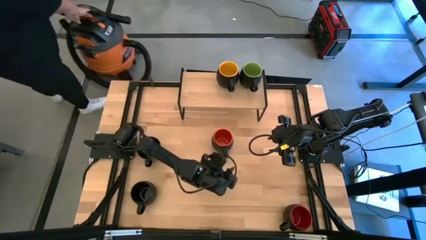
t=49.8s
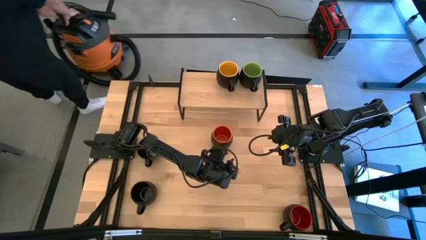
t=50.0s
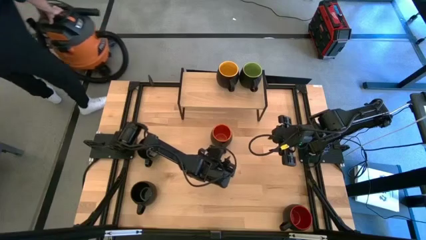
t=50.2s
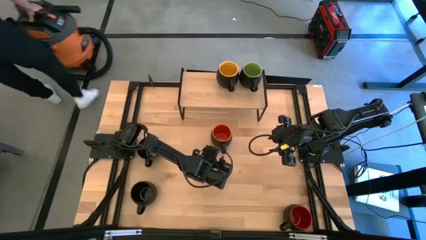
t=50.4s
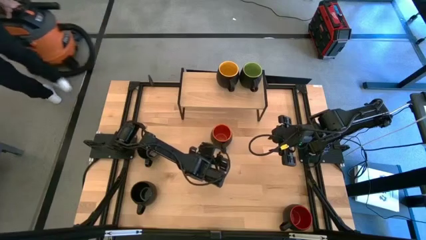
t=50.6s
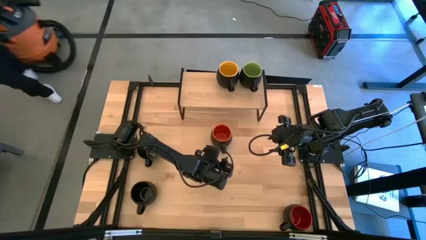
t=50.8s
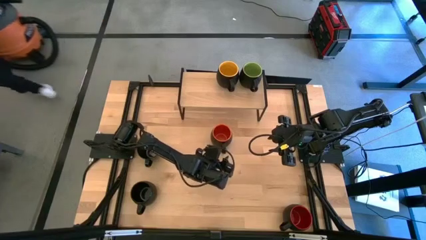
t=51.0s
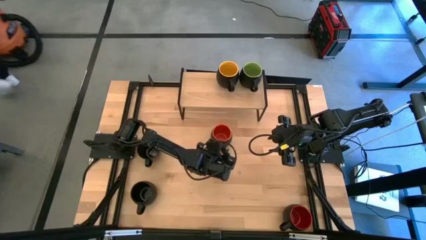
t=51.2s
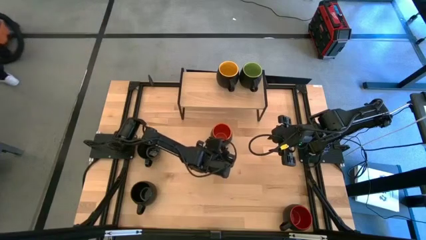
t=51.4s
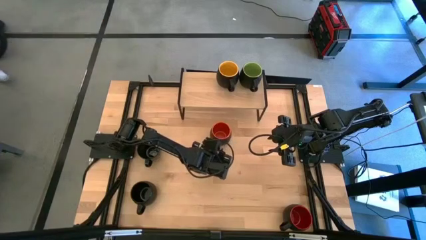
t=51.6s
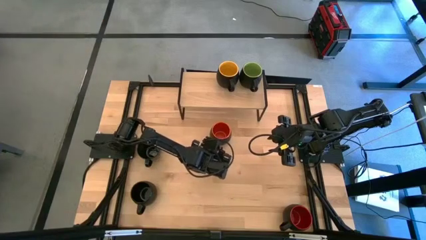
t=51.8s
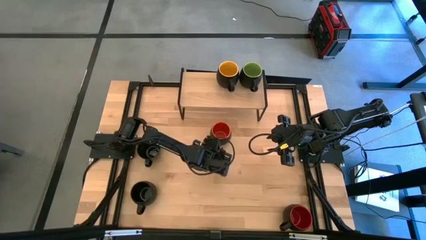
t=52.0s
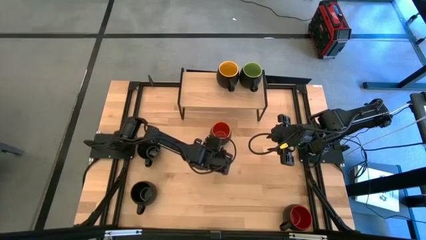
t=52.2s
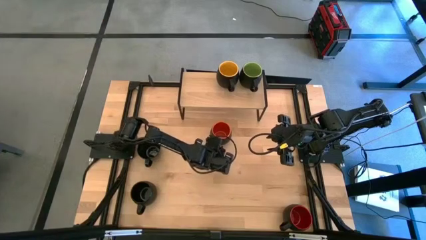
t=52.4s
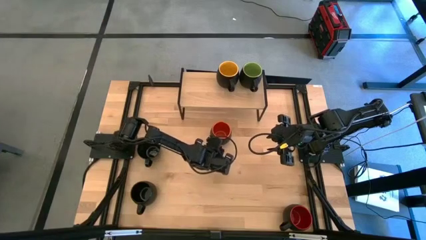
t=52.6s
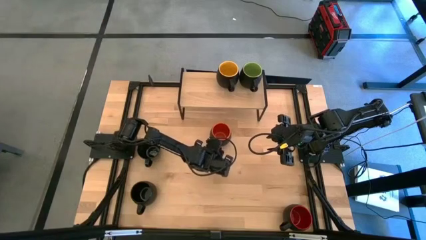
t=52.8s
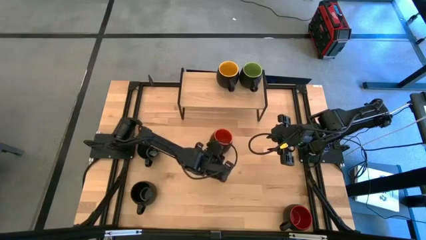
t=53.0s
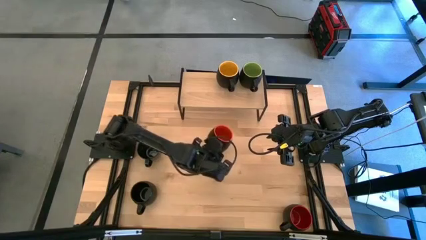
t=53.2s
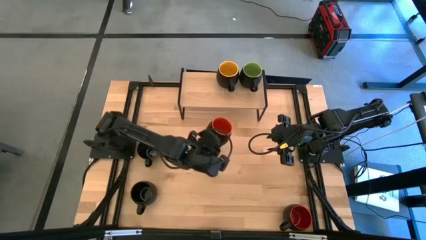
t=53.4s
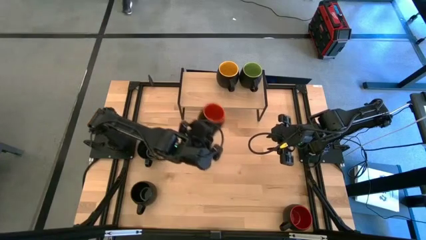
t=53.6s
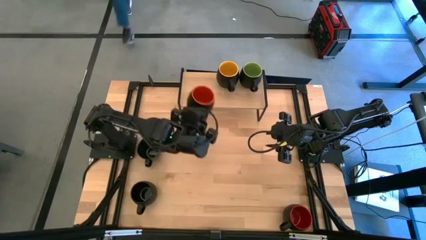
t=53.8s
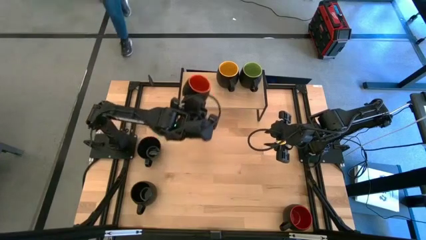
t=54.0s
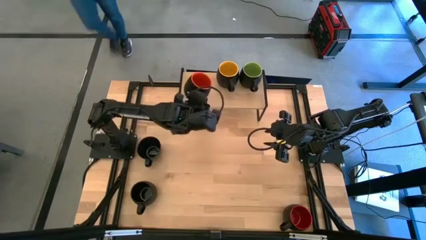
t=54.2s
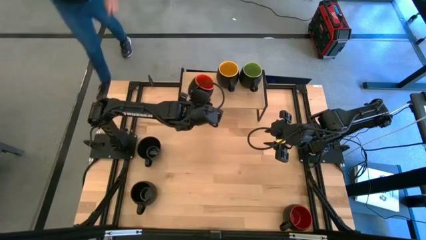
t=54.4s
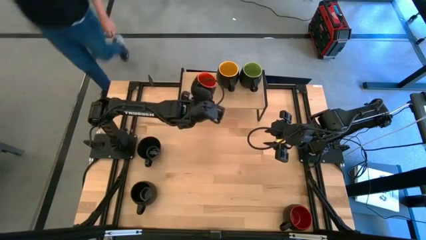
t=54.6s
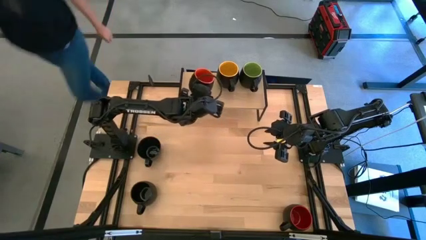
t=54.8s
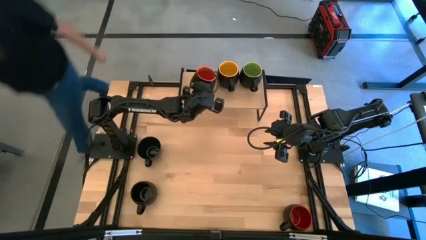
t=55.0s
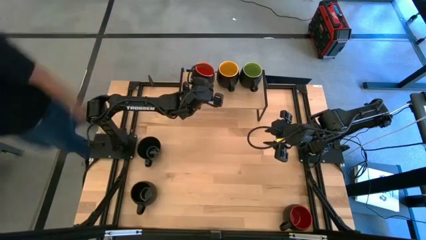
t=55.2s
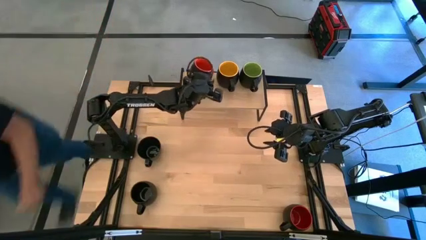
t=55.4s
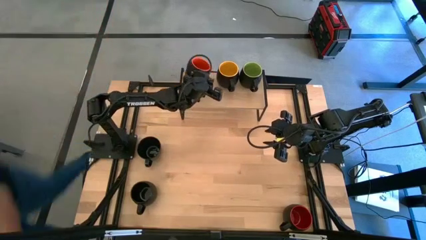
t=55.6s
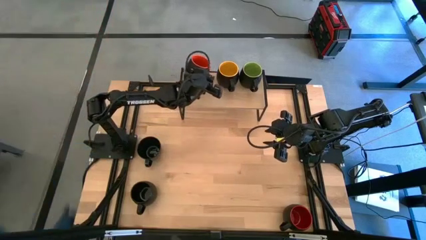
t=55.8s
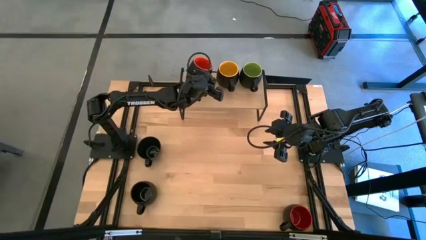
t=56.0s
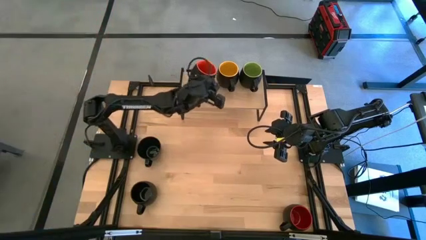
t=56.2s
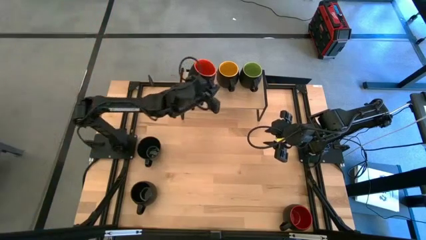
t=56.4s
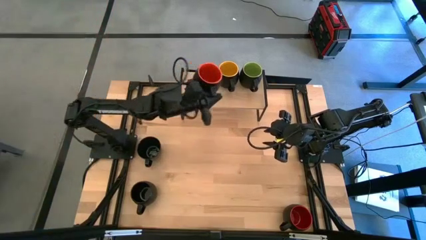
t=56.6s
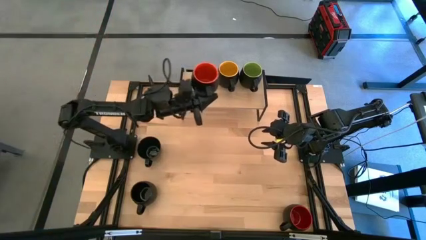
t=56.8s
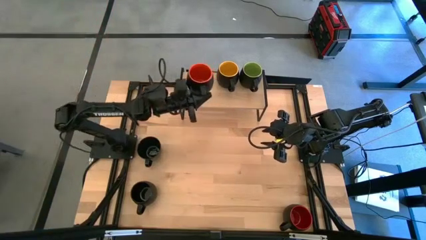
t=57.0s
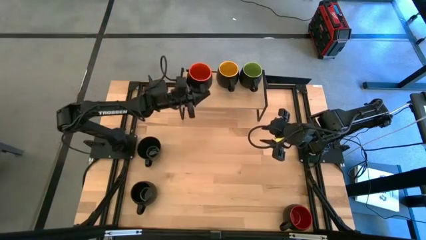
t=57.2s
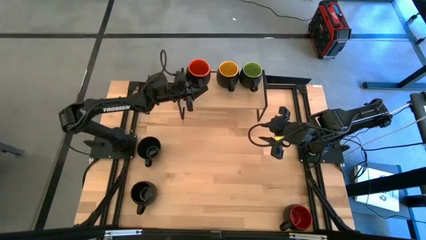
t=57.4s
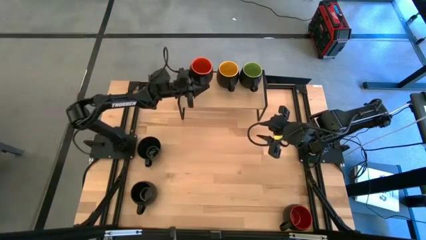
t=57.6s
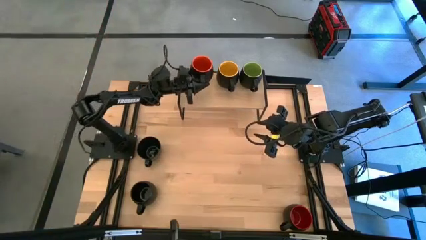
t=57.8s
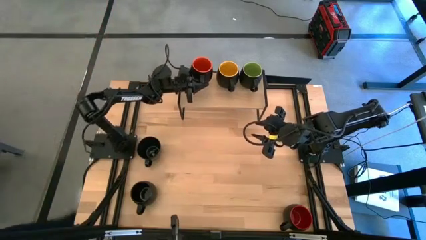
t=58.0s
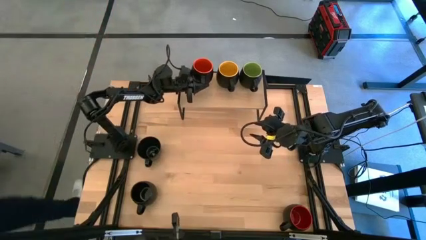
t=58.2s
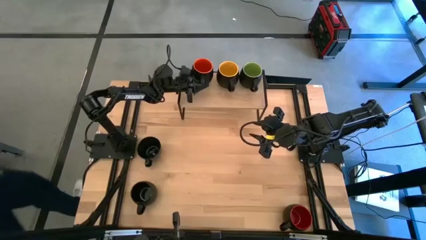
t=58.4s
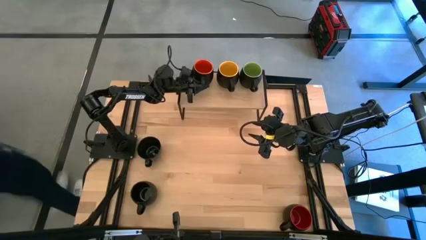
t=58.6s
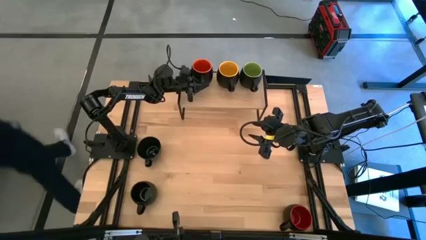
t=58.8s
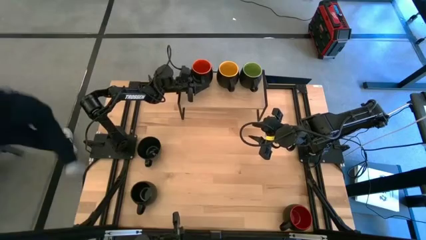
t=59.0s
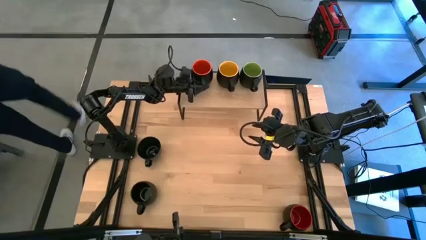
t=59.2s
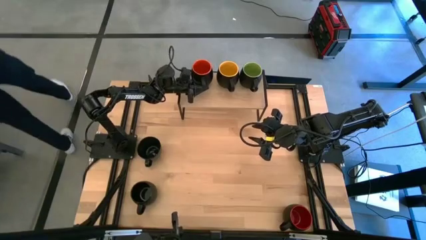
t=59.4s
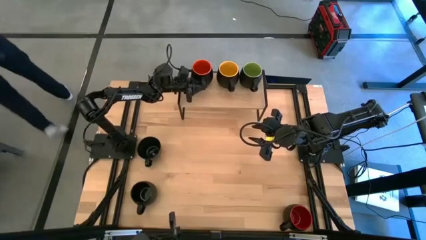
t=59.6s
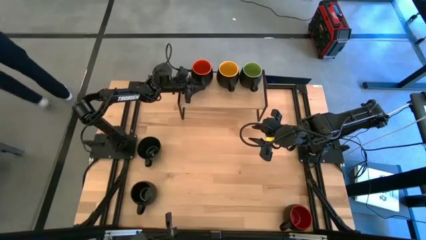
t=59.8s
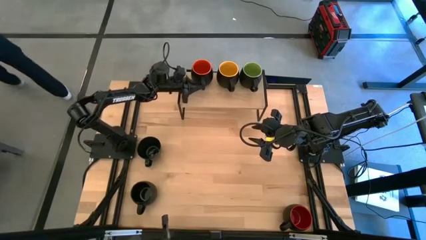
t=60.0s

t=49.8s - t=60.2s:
Task: Place coffee mugs
Put the orange mug on the shelf

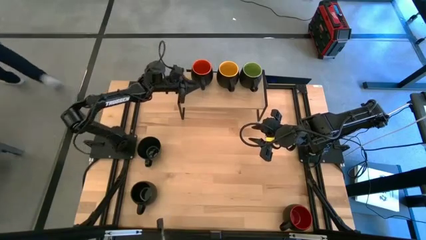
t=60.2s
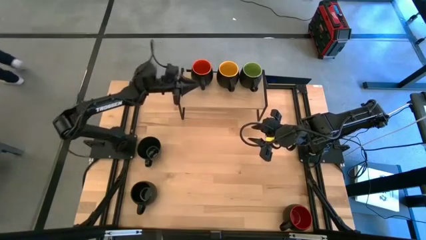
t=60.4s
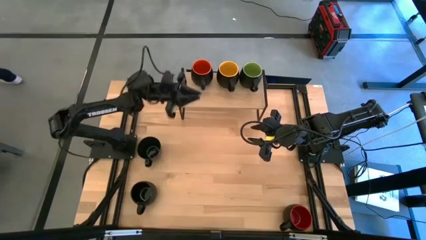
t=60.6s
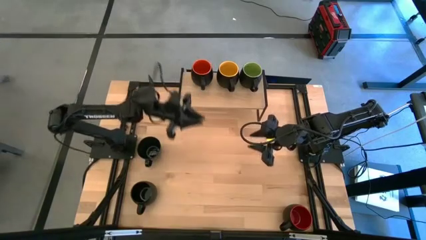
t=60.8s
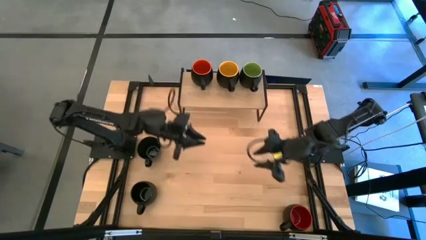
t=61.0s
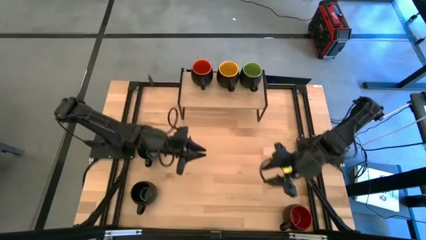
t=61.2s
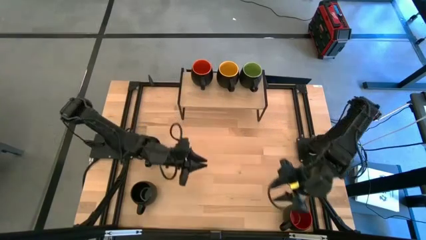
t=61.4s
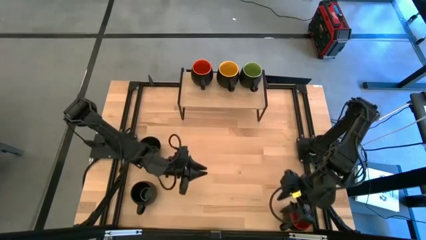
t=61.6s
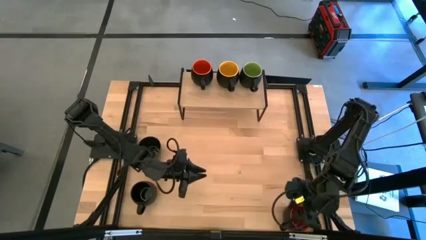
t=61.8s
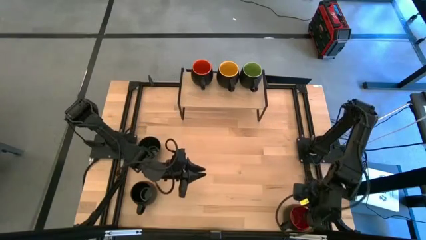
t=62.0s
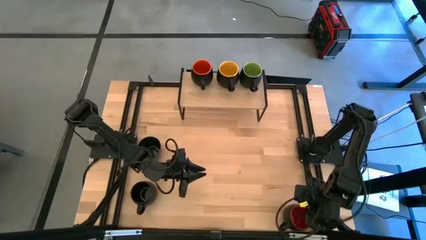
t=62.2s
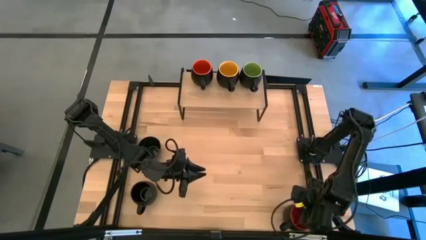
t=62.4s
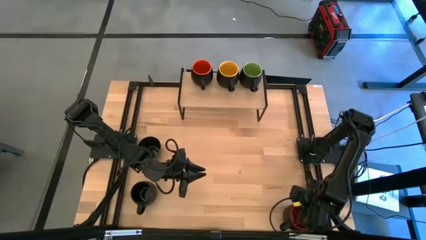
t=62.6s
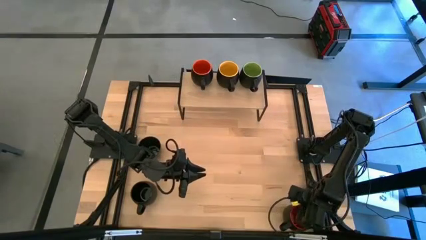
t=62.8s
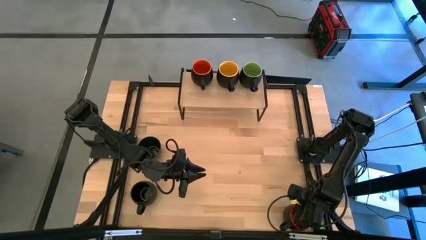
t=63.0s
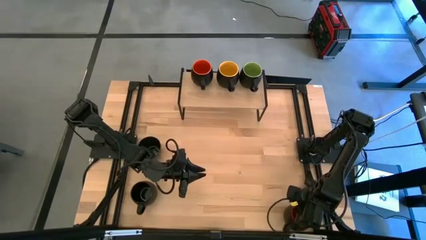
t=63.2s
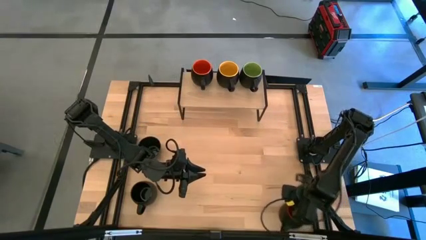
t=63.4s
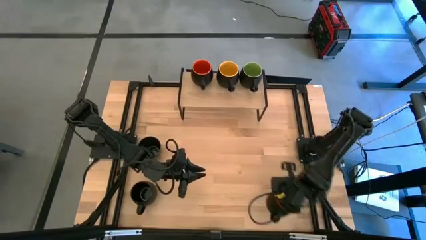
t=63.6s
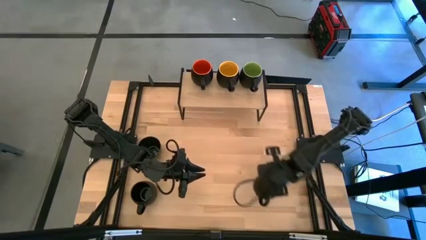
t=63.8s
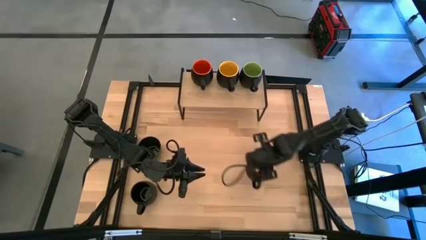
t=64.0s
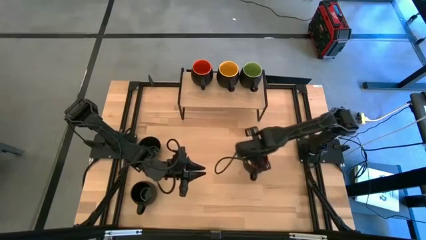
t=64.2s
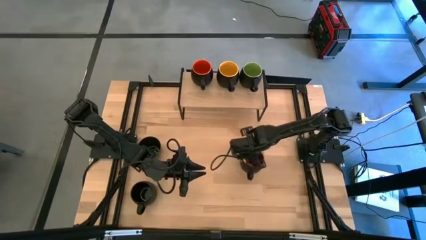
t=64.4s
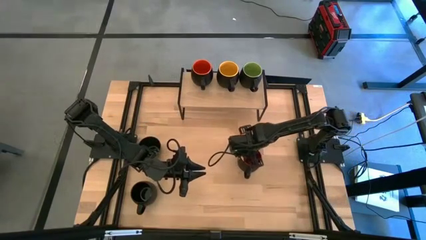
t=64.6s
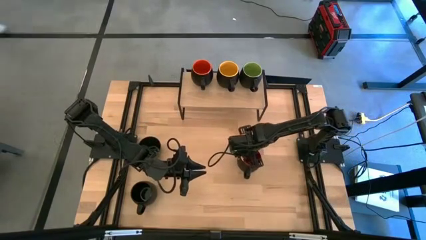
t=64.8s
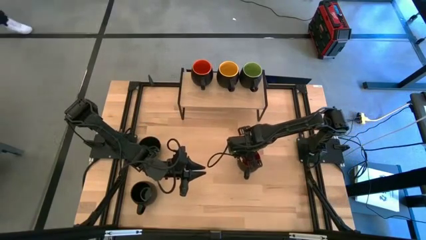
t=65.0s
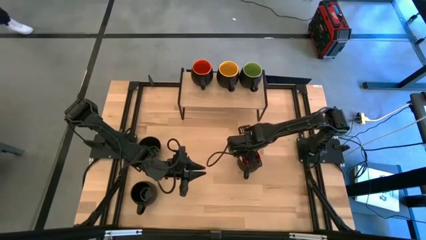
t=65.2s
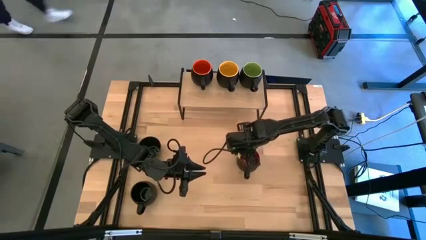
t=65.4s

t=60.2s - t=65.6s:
Move the red mug to the center of the table

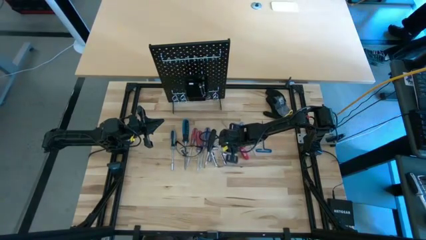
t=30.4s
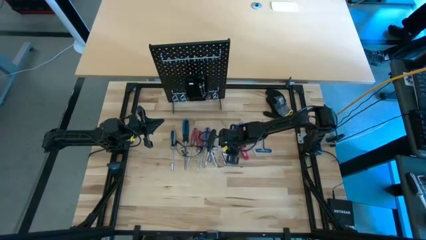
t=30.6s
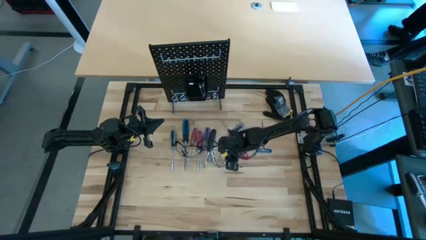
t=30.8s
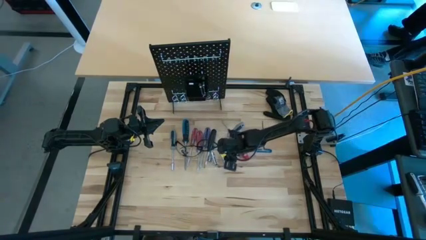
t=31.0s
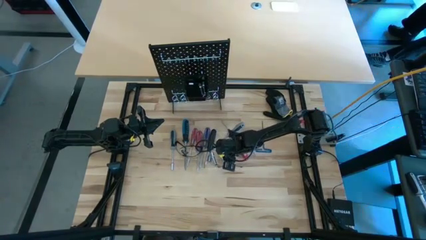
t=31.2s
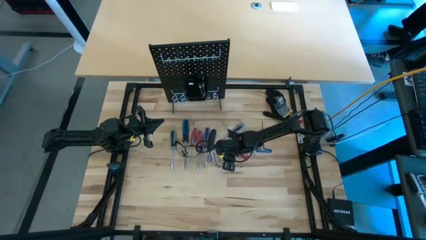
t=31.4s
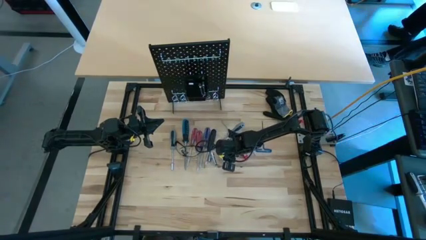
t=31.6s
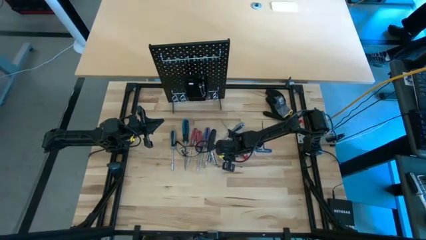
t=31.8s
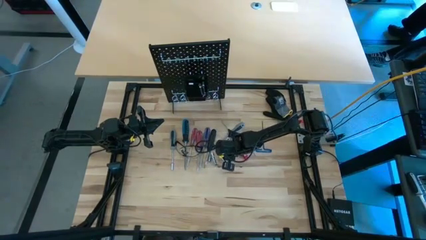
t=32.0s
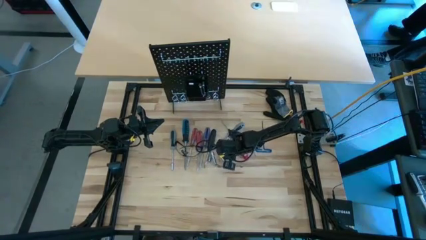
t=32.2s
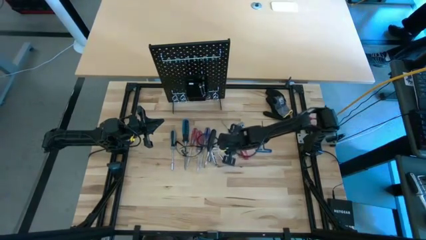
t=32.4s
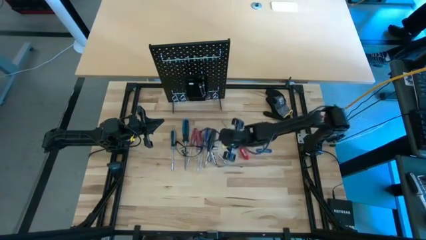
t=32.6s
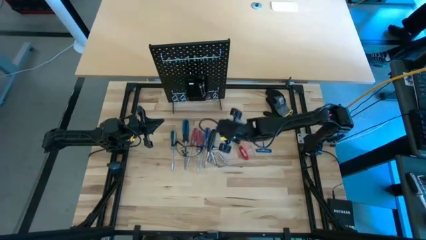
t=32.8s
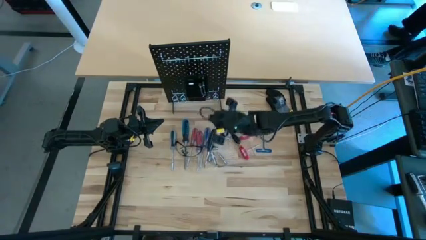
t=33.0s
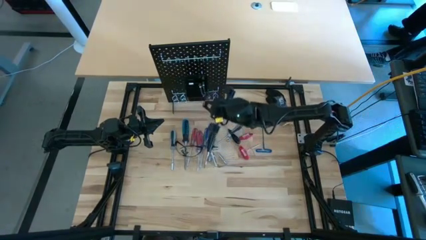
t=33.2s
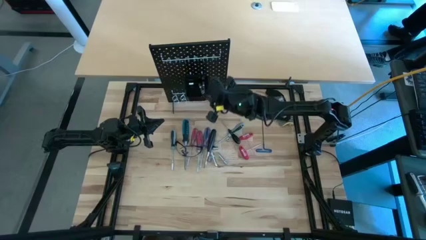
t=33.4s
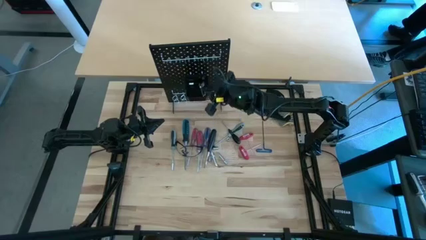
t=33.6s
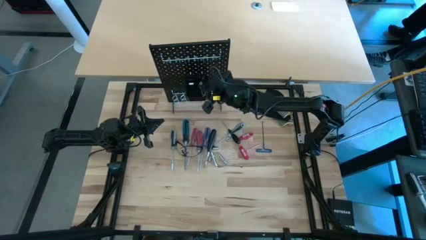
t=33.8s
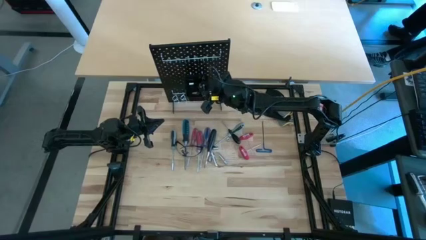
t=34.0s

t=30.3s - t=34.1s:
Task: Hang tools onto peg board
Put the bottom right metal socket into the black bin on the peg board
